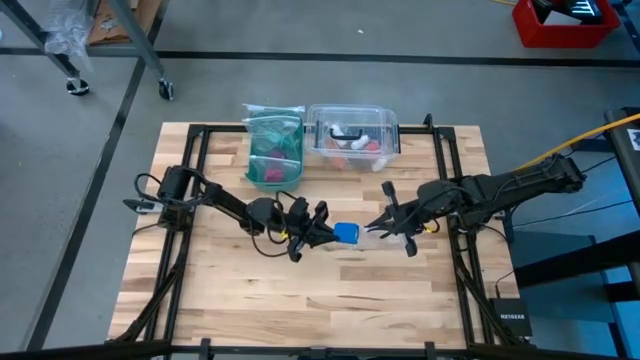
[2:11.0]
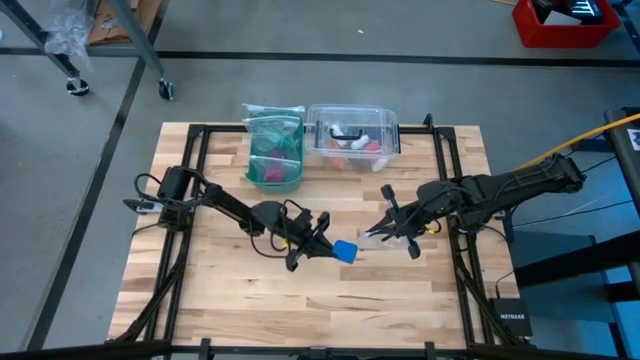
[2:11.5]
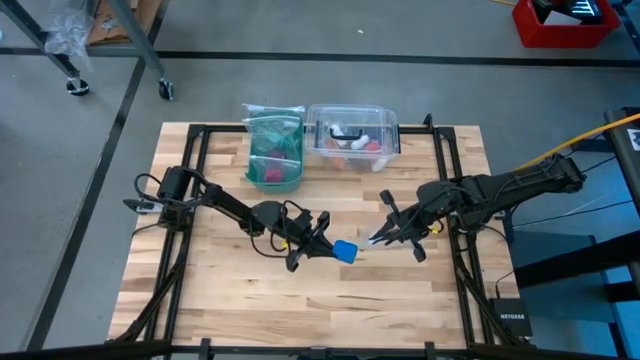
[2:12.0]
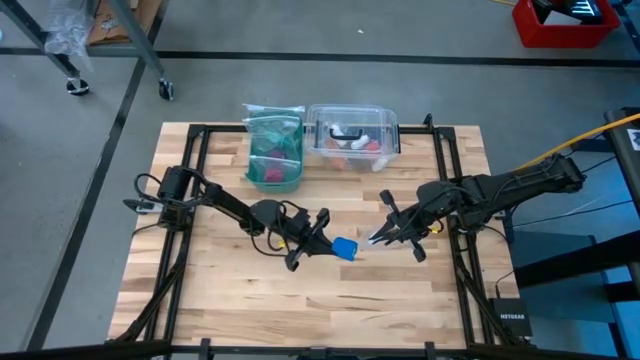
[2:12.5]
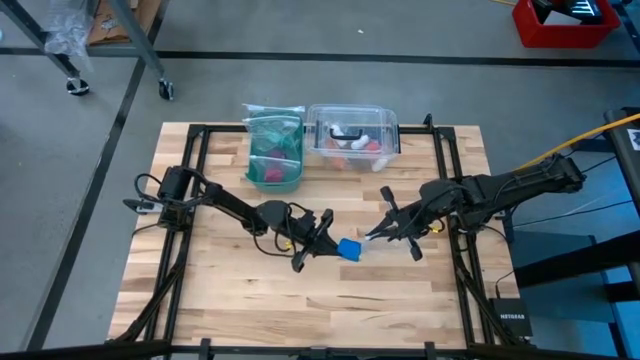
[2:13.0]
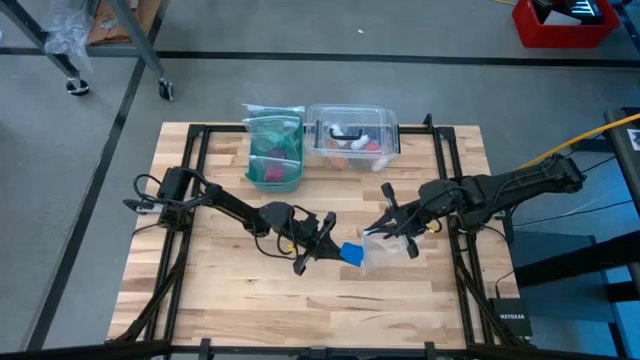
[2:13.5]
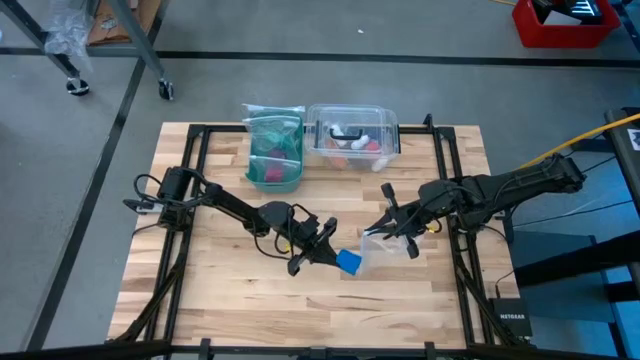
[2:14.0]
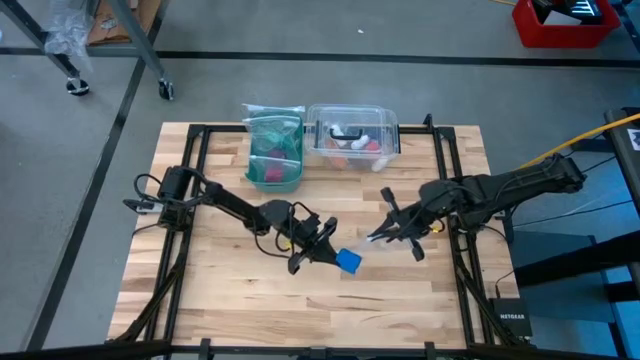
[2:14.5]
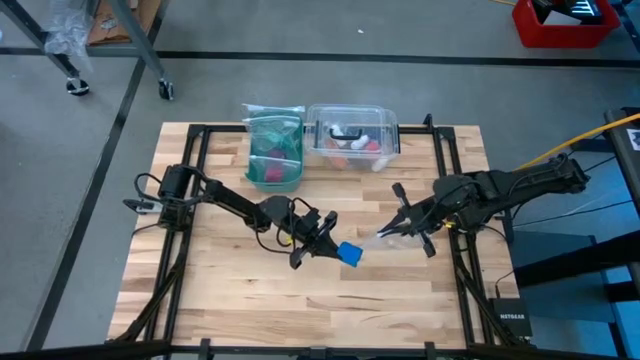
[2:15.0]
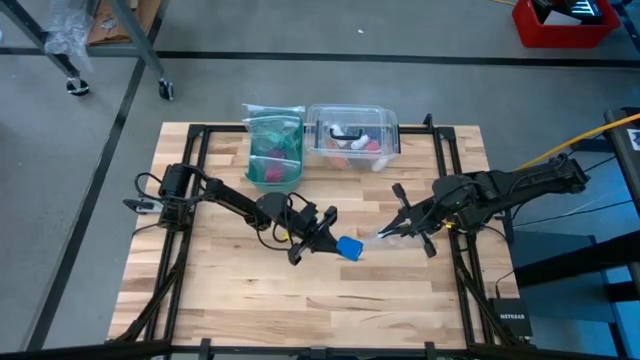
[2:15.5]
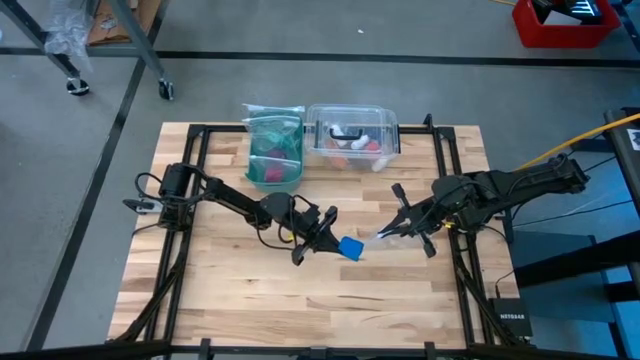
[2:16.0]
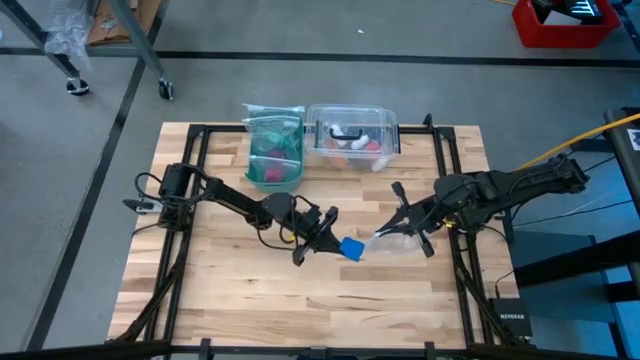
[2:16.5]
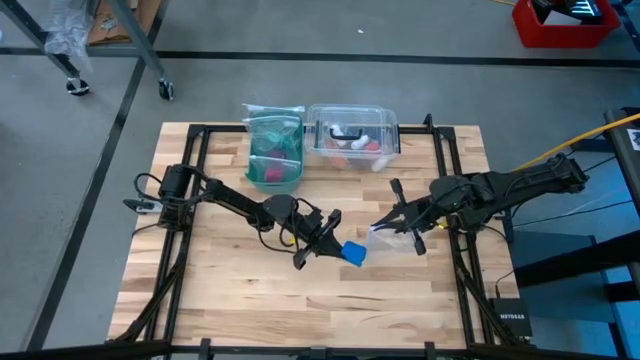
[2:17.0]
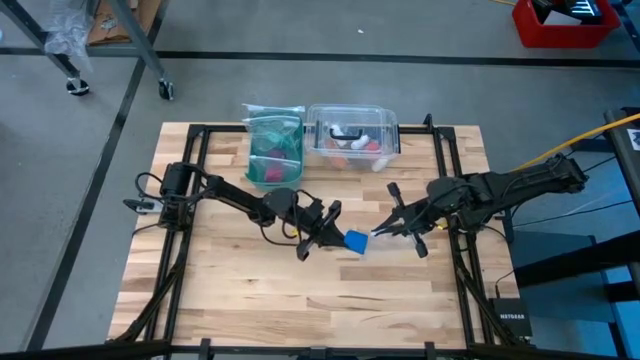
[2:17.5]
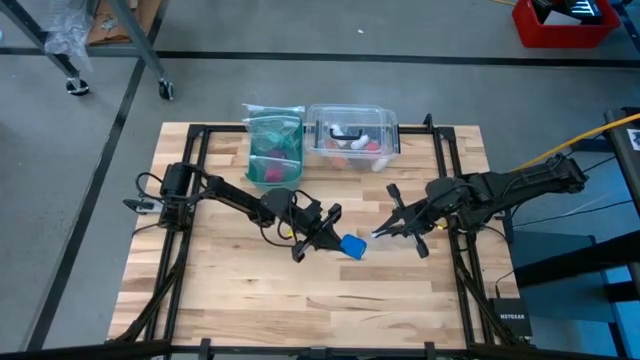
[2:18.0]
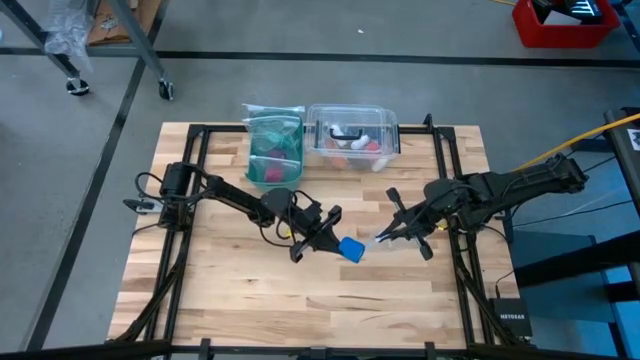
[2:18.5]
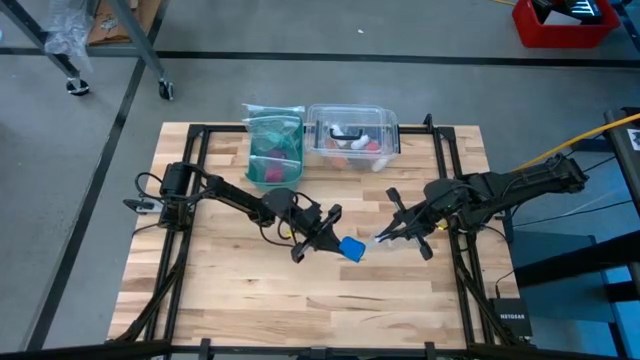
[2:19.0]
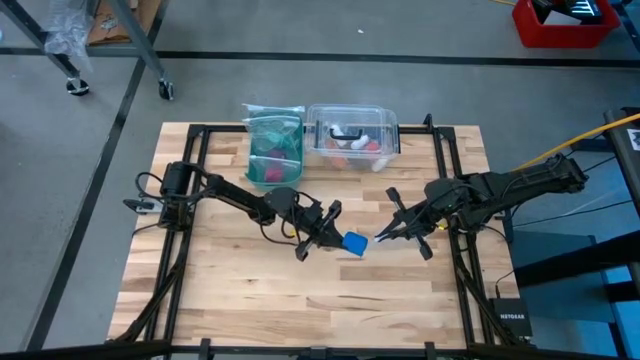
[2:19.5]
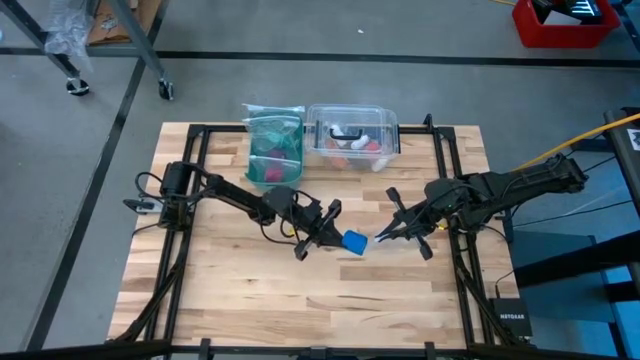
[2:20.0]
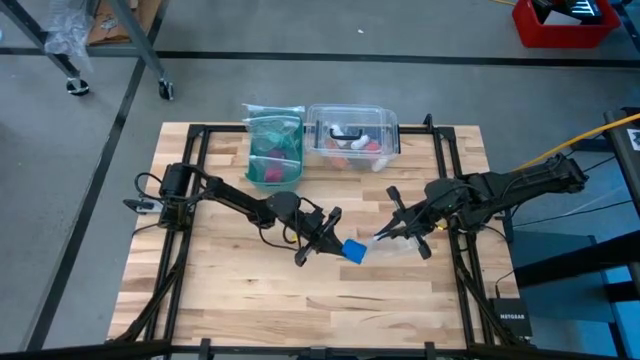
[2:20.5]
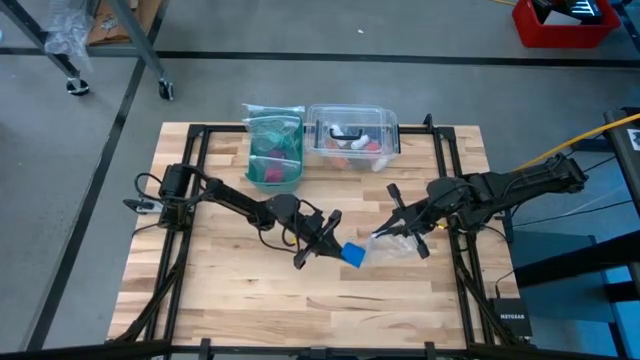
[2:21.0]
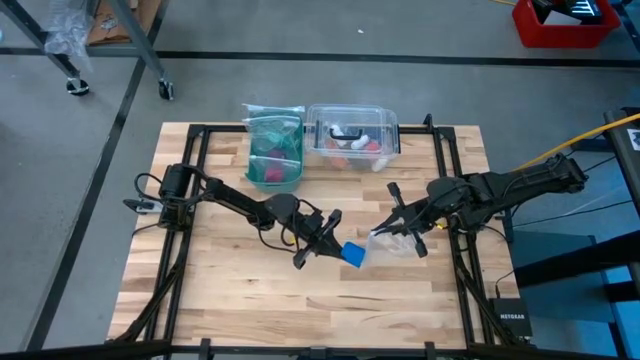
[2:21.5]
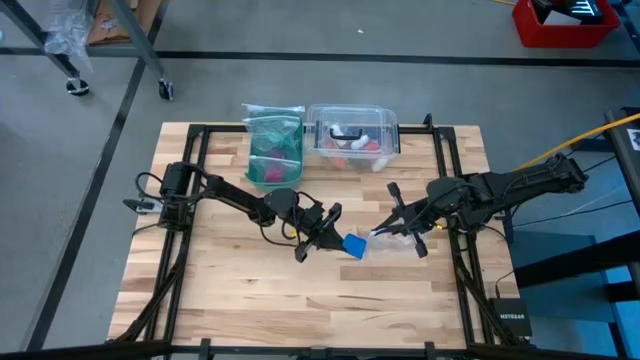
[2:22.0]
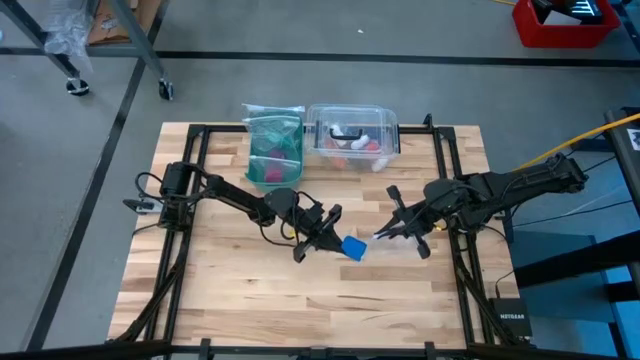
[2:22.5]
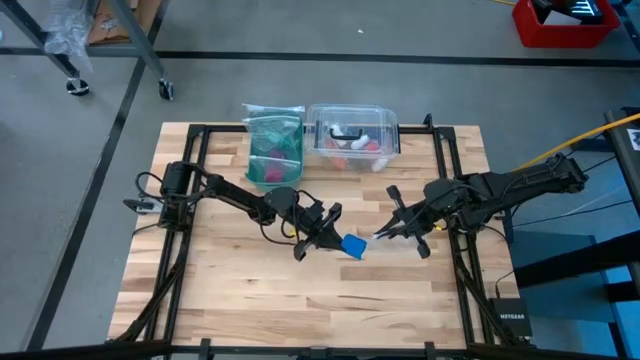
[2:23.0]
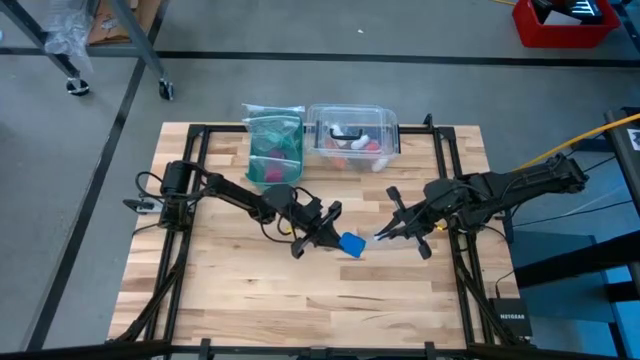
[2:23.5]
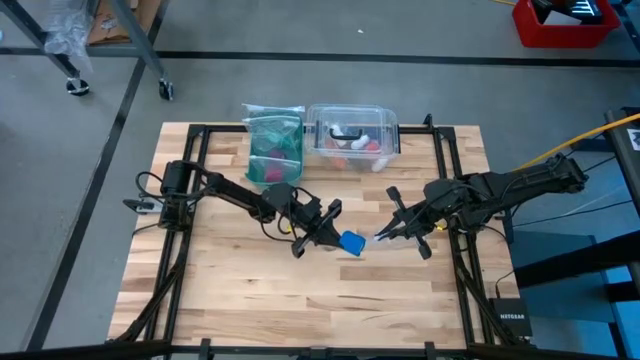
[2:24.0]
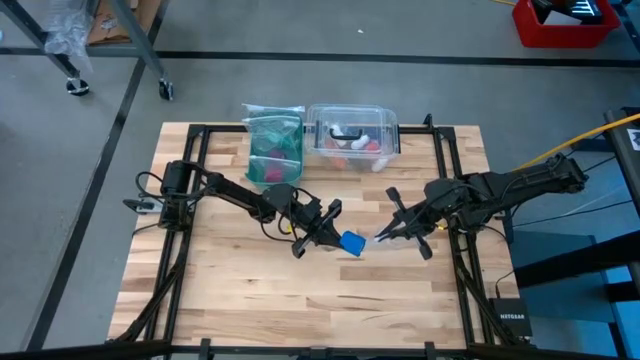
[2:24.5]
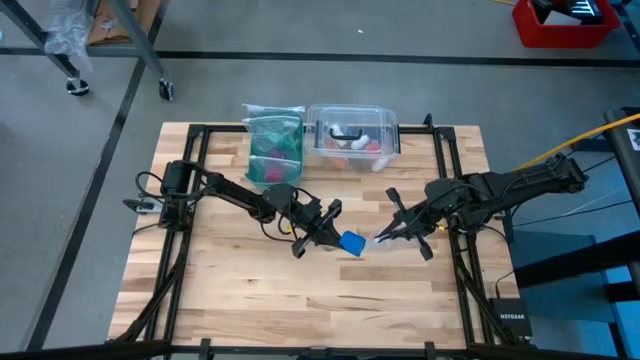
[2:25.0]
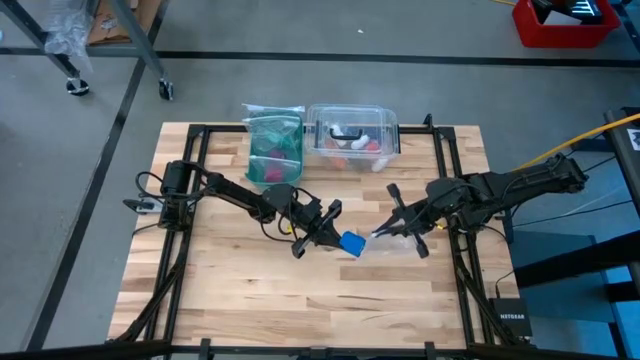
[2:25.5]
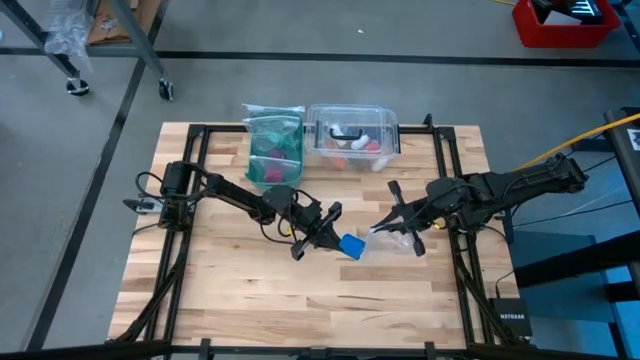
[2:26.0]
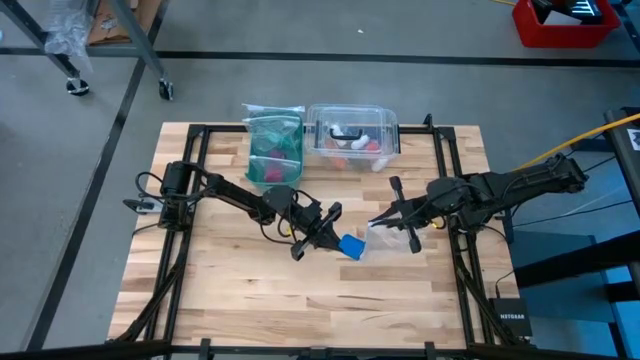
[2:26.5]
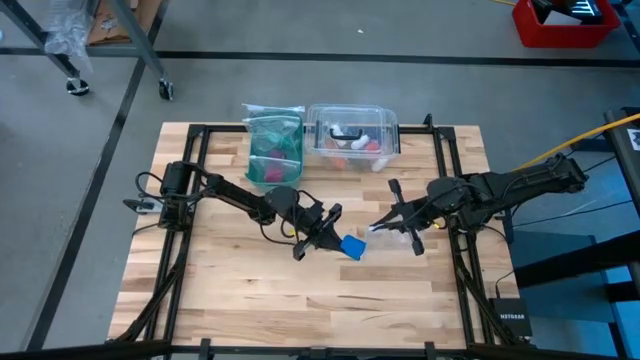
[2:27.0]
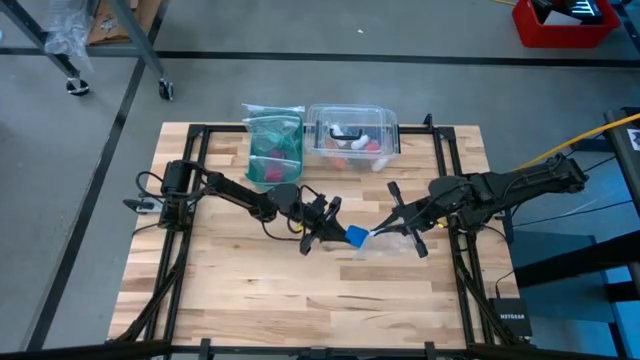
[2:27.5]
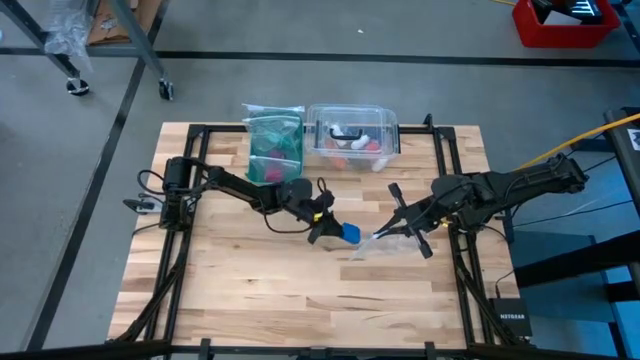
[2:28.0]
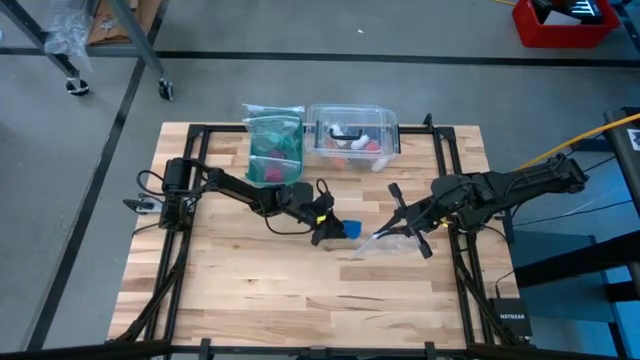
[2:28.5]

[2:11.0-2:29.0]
Task: Roll bandage
Put the blue bandage into the transparent zip bag

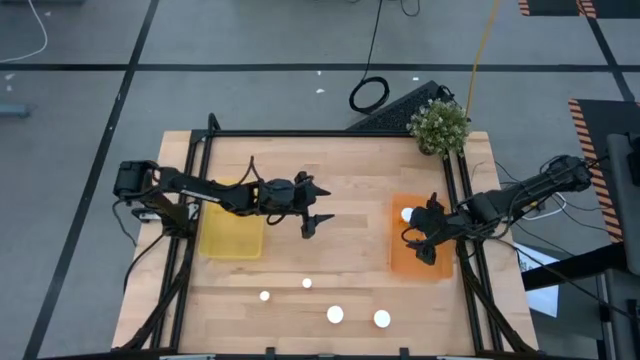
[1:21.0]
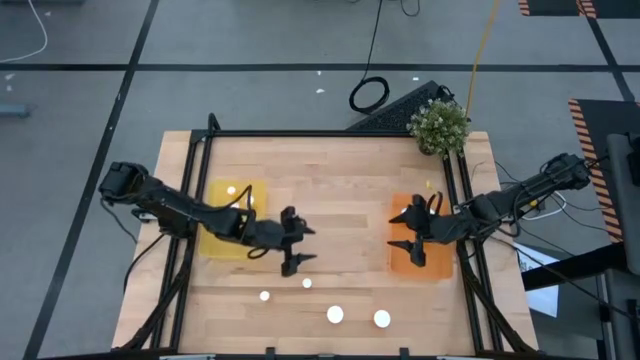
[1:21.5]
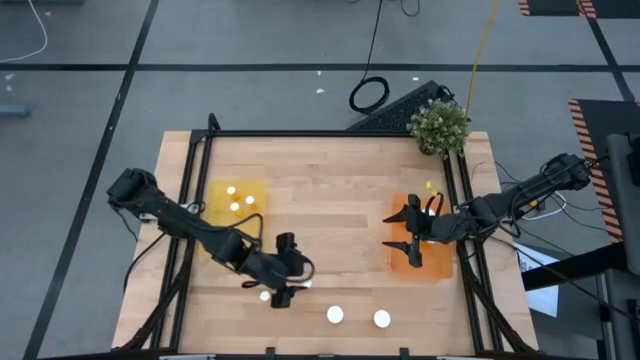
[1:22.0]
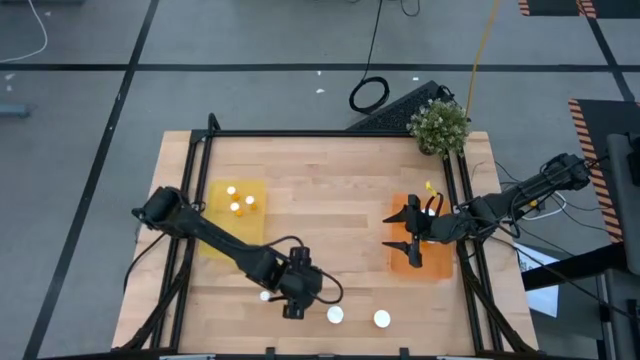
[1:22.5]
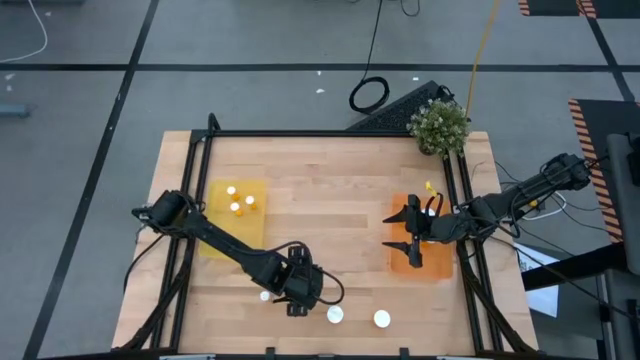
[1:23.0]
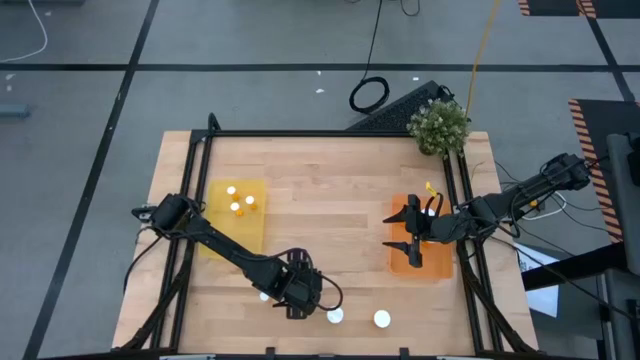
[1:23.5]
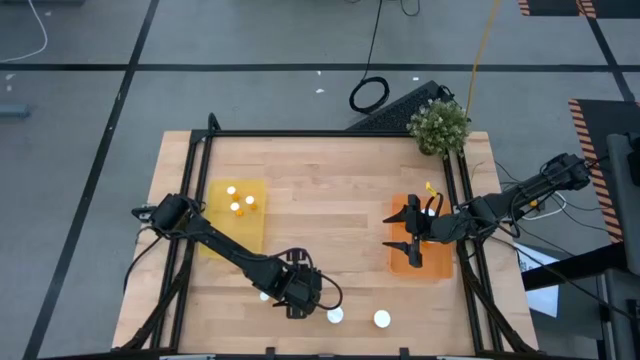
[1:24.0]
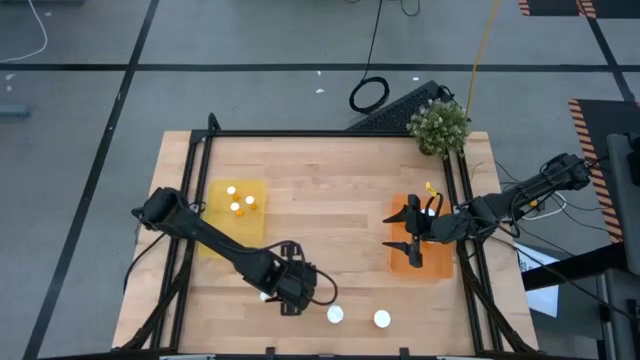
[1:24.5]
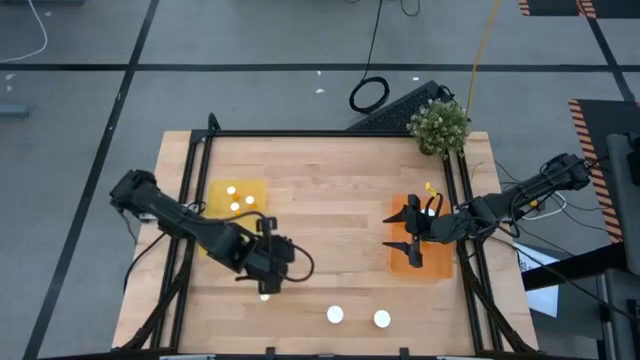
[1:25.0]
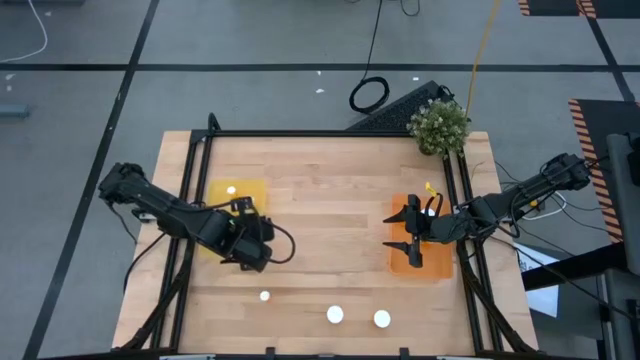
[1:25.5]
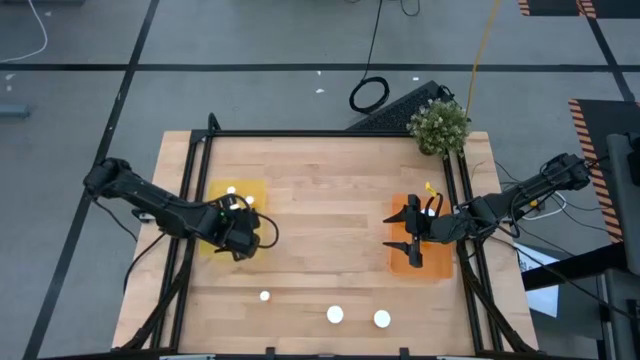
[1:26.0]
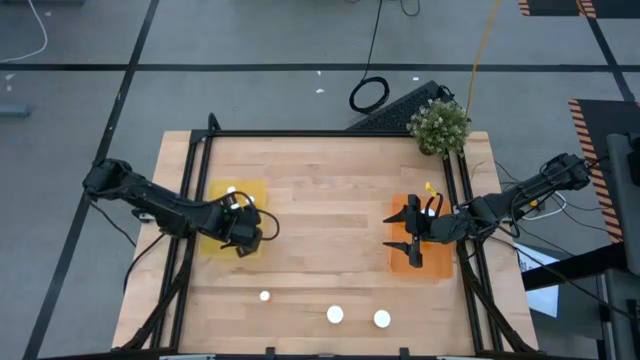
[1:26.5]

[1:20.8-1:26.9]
Task: Pick and place medicine bottles into bin by pill shape (circle, oval)
Put the small orange pill bottle into the yellow bin
